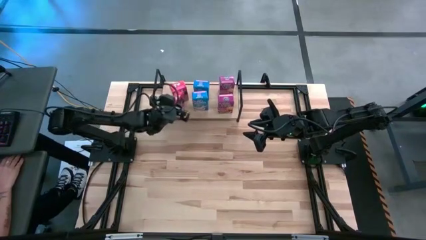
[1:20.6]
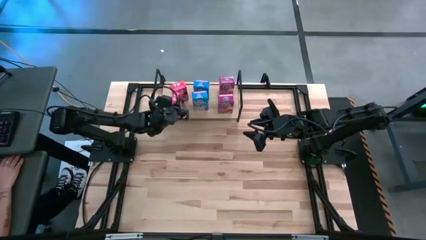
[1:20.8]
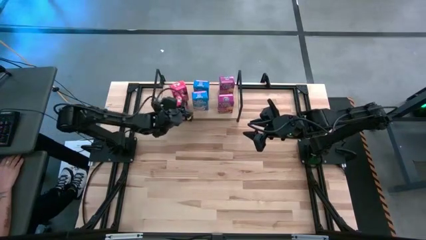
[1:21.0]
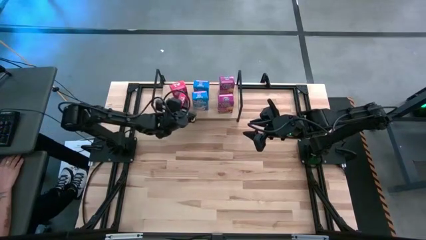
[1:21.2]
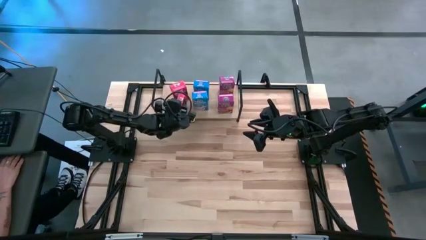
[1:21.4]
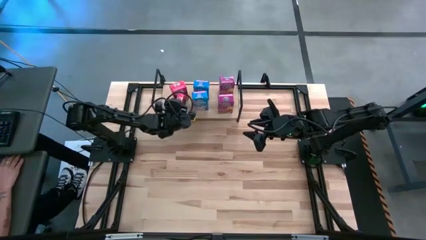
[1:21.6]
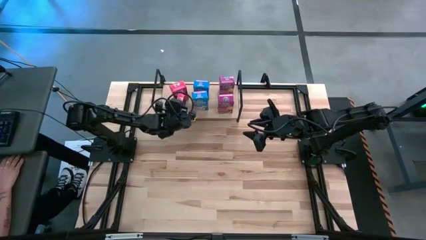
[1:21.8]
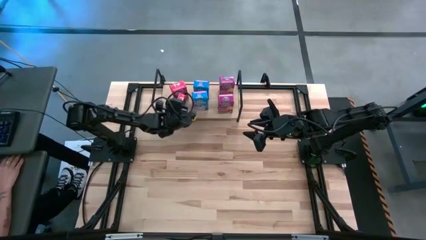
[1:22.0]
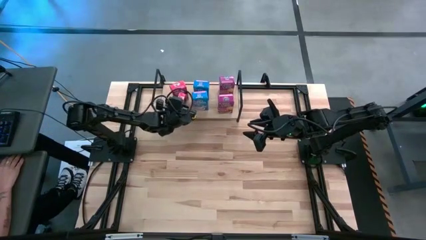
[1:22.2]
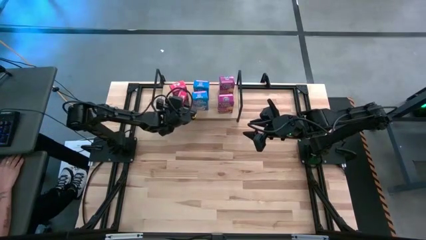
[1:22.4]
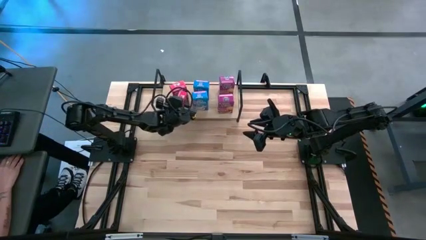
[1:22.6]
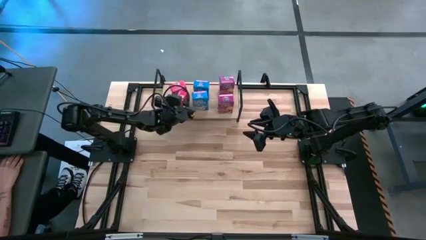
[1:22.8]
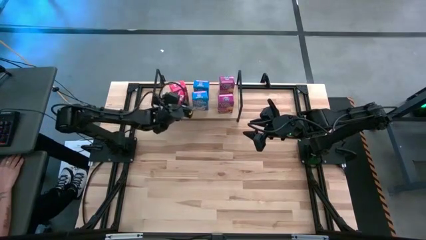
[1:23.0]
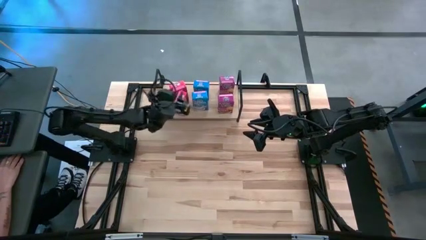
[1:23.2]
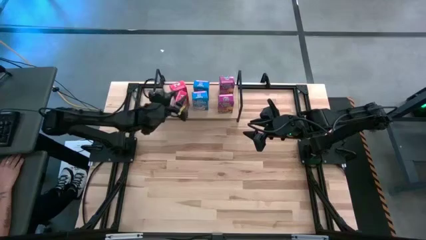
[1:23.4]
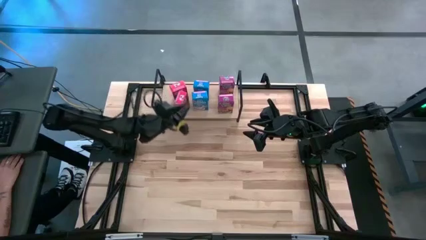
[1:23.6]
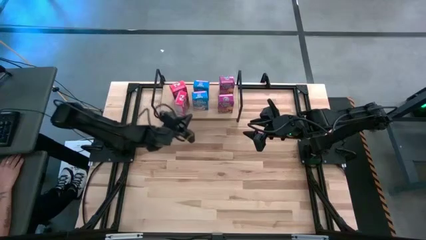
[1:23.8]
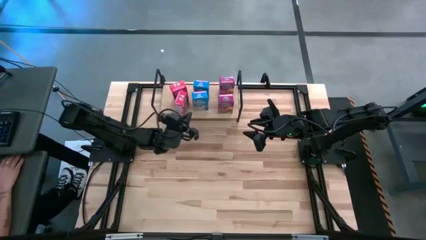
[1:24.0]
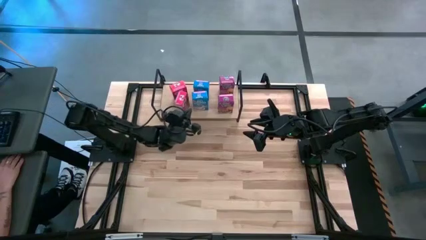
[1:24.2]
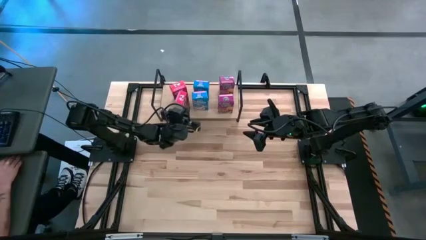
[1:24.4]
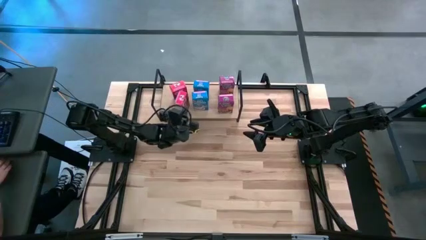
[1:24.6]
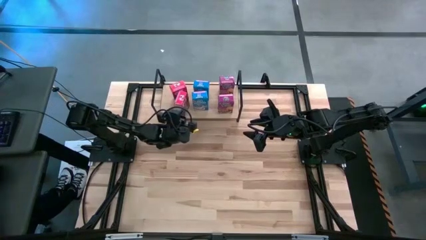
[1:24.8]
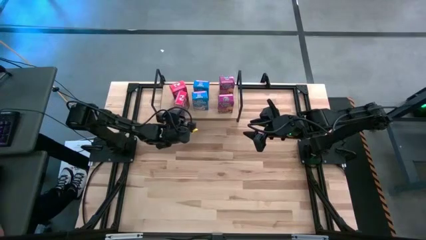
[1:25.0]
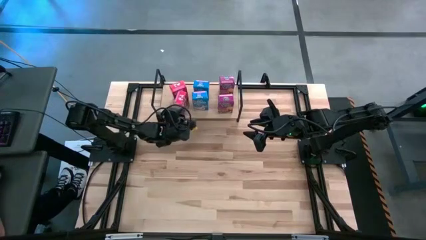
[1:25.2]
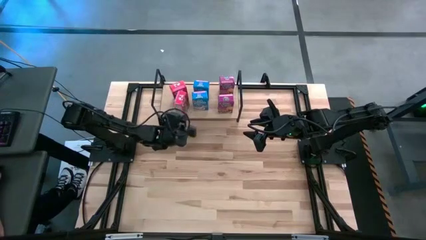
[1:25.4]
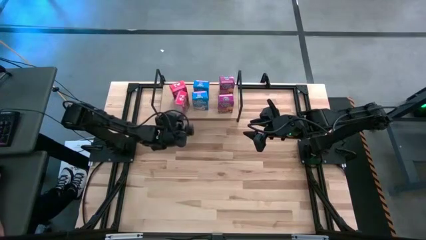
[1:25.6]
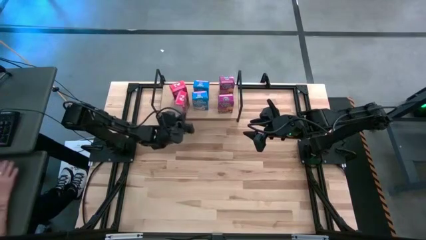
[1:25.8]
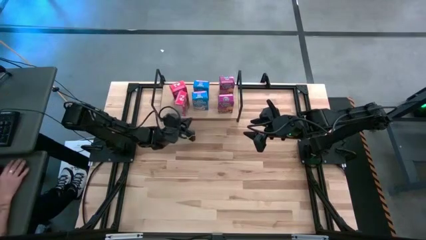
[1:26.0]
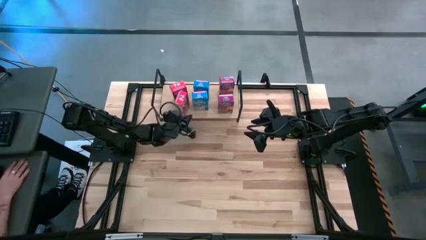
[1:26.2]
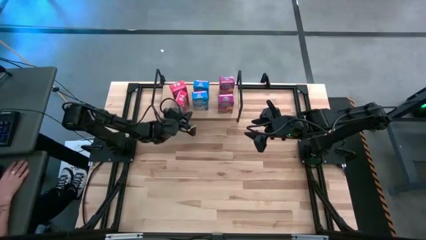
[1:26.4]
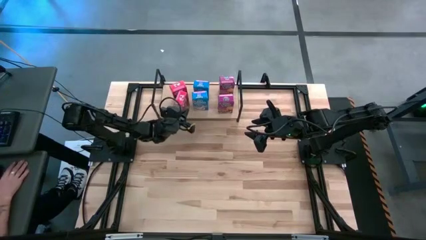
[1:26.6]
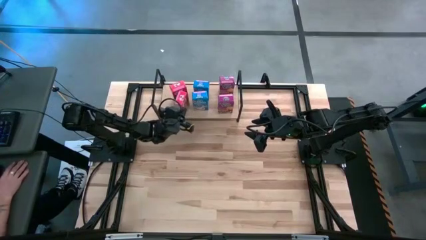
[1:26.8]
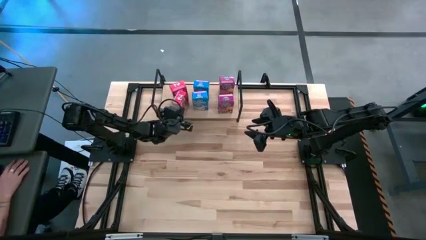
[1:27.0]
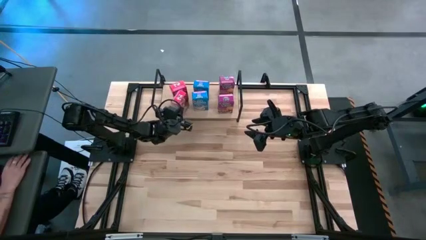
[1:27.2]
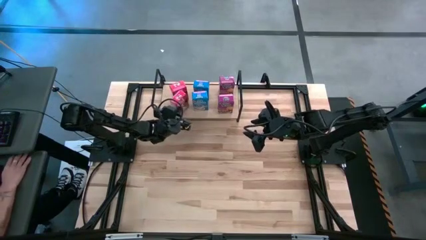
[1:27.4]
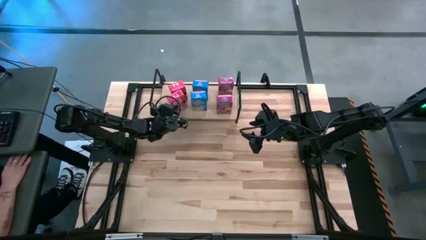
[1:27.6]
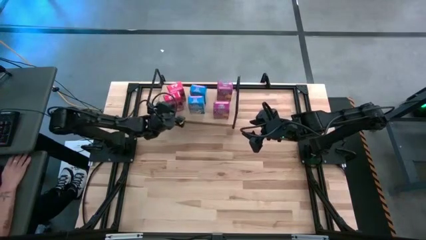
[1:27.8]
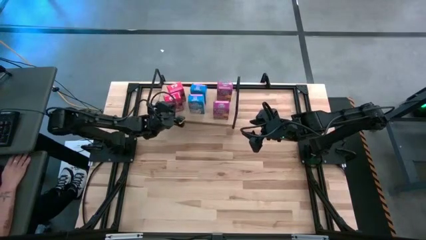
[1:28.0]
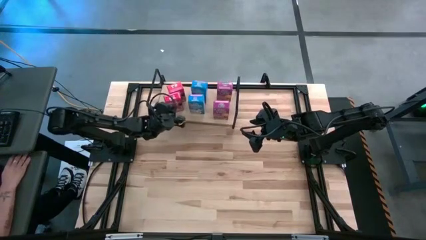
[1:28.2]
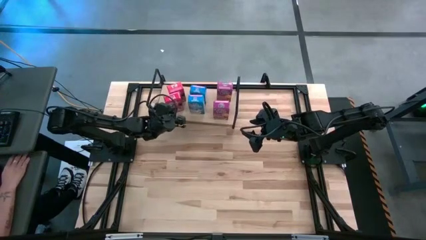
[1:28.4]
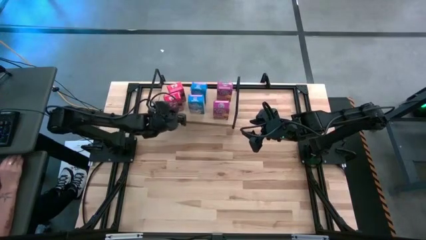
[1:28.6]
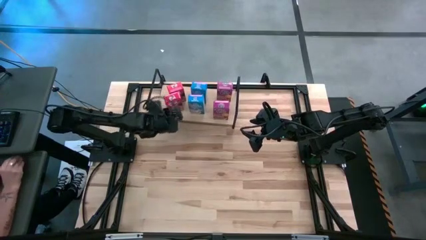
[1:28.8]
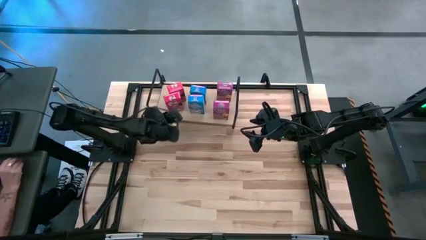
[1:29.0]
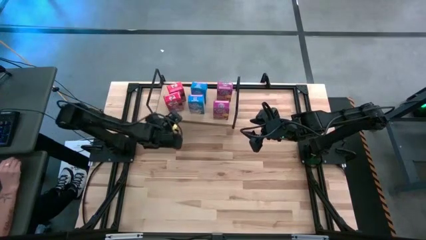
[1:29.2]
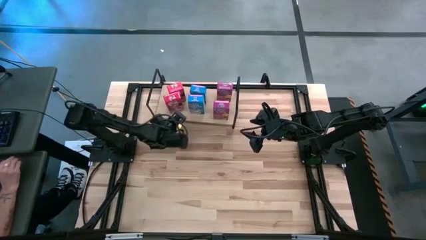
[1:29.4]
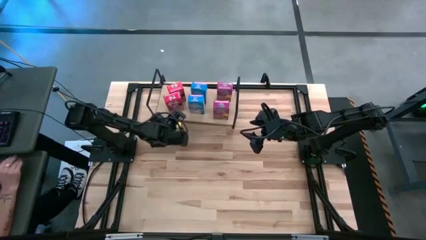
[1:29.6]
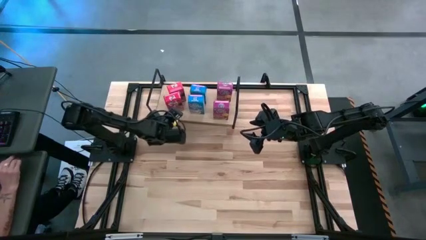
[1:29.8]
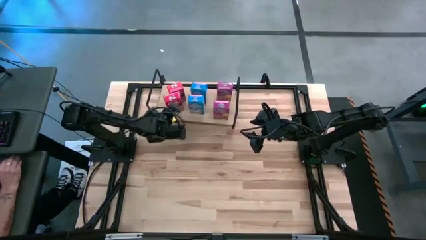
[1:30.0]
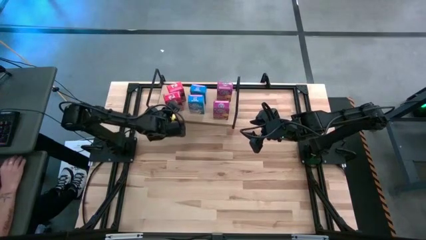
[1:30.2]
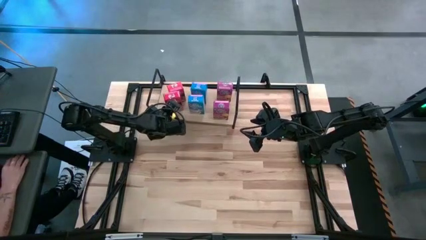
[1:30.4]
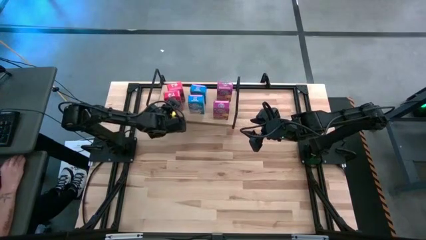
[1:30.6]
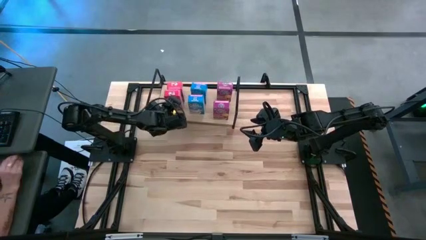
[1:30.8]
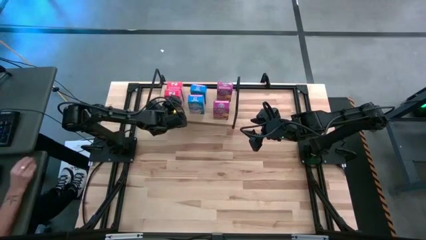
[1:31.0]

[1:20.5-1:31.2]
Task: Stack cereal on shelf
Put the red cereal box on the shelf aligned with the other red cereal box

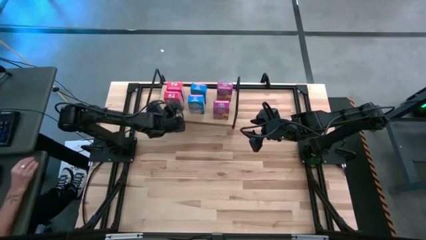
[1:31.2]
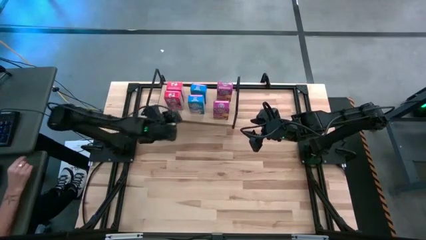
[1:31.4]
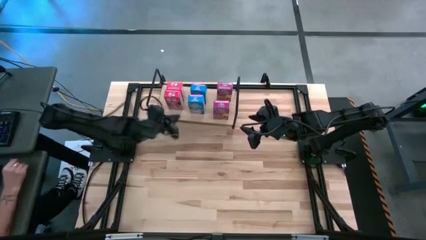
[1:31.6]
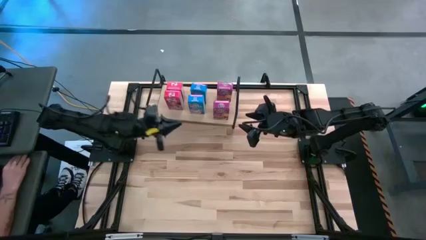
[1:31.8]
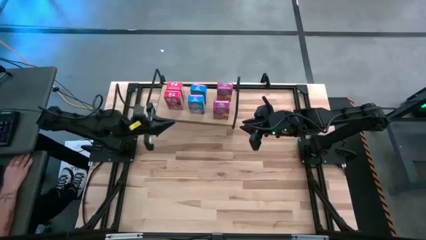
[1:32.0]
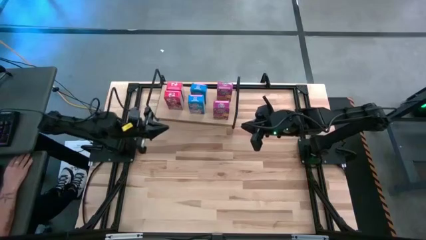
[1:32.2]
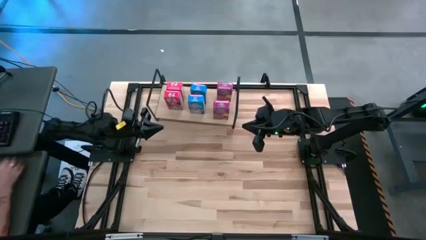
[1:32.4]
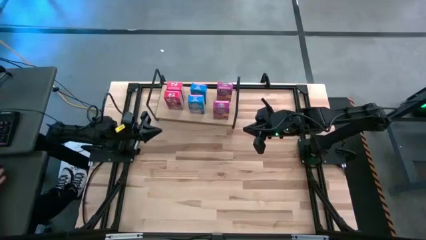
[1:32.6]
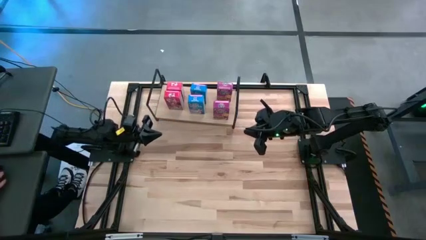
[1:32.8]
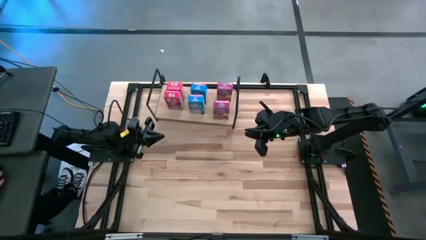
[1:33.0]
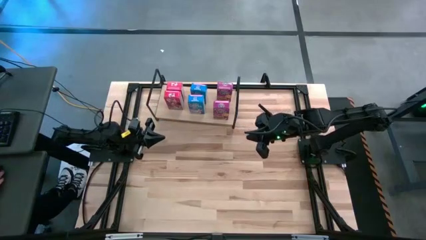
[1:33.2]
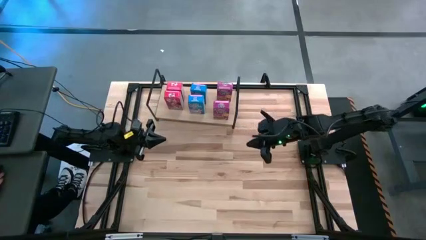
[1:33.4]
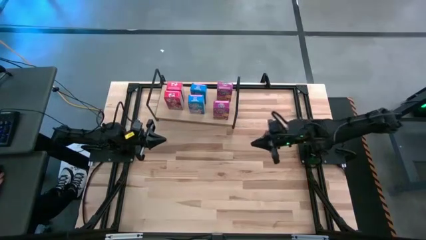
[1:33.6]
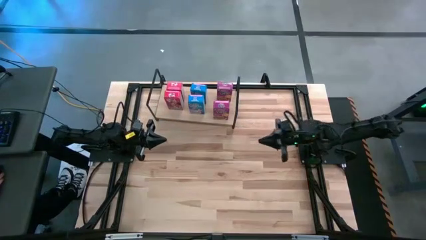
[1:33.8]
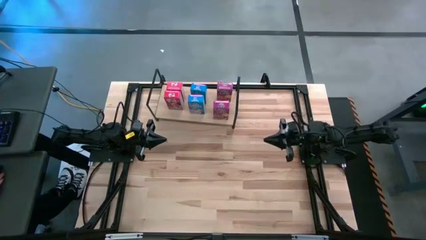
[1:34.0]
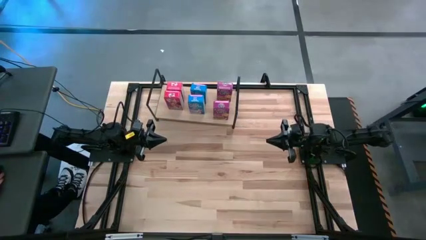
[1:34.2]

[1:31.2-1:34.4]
Return to Home Position
